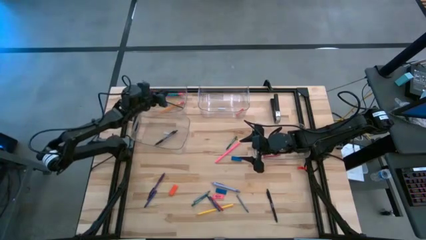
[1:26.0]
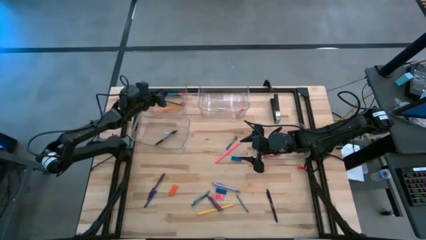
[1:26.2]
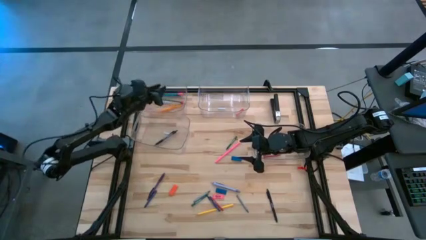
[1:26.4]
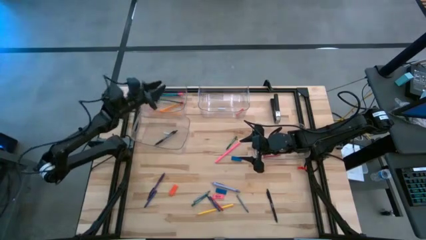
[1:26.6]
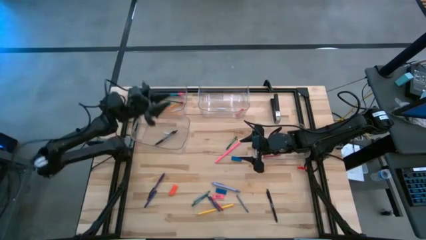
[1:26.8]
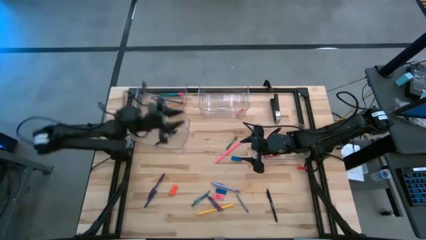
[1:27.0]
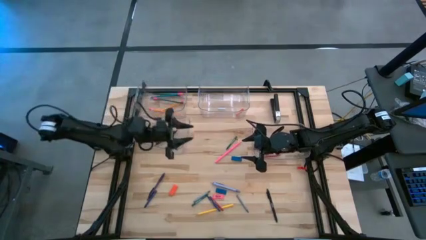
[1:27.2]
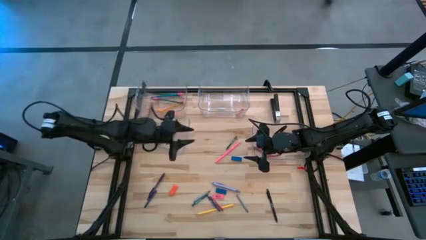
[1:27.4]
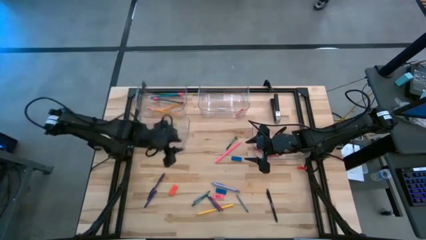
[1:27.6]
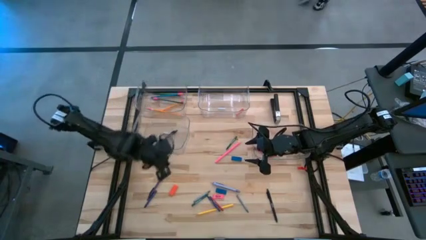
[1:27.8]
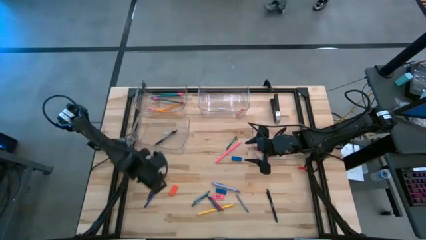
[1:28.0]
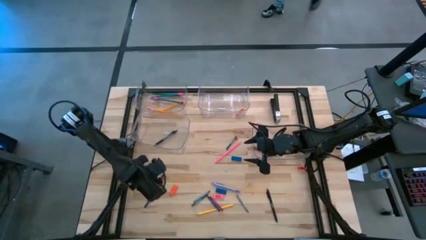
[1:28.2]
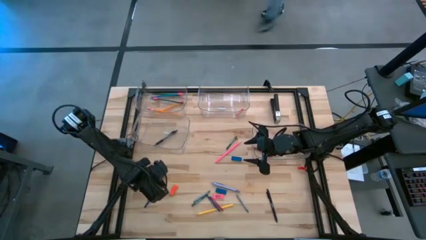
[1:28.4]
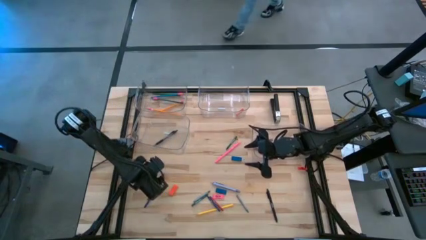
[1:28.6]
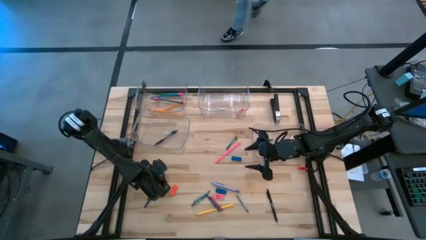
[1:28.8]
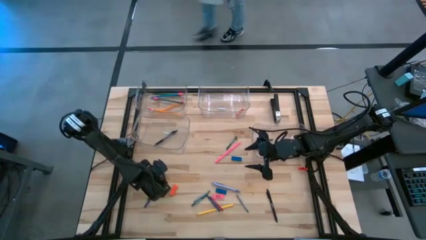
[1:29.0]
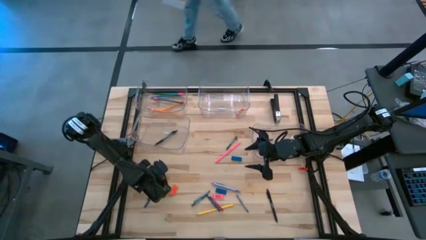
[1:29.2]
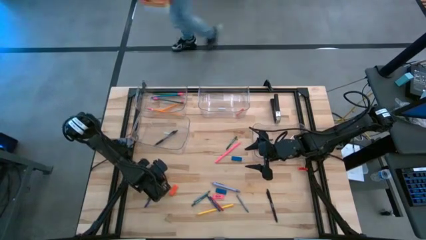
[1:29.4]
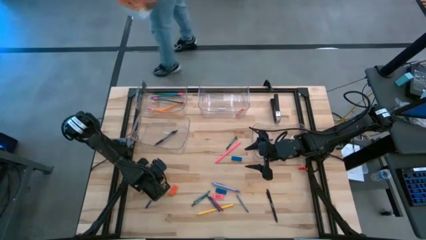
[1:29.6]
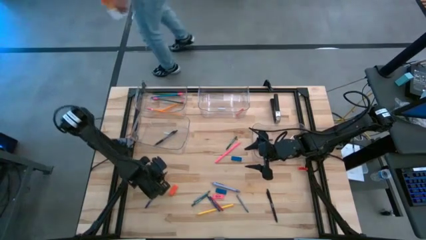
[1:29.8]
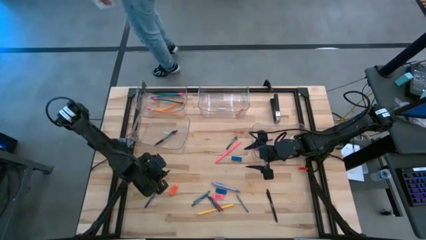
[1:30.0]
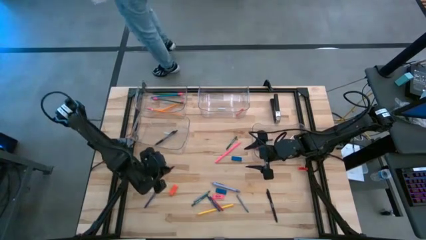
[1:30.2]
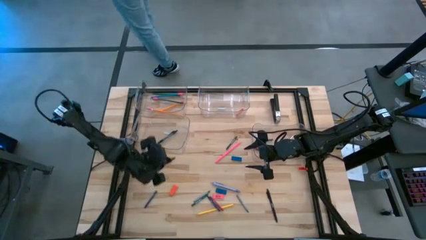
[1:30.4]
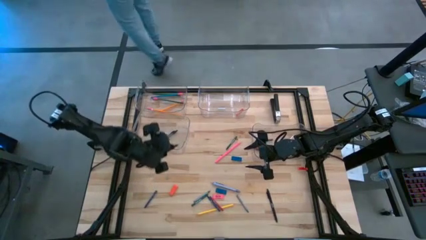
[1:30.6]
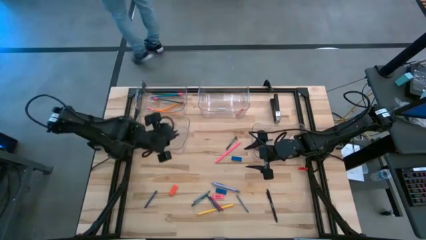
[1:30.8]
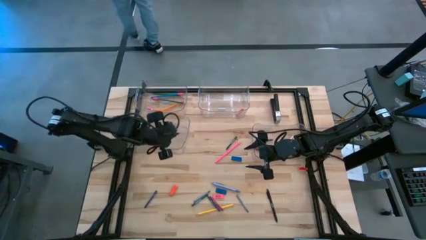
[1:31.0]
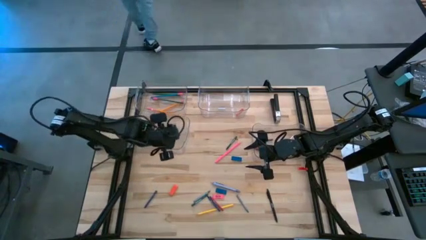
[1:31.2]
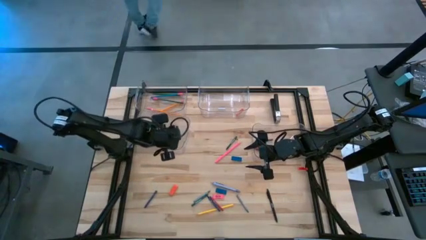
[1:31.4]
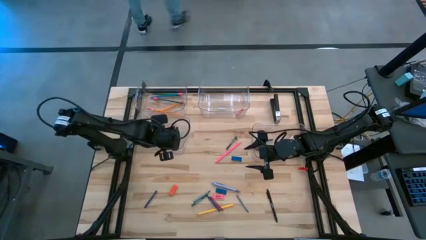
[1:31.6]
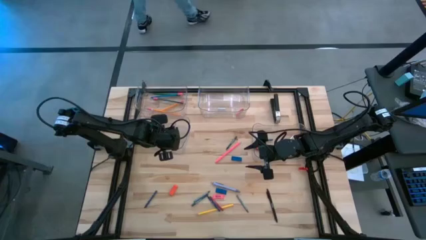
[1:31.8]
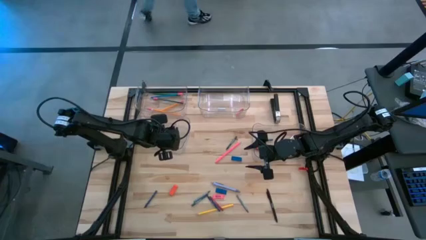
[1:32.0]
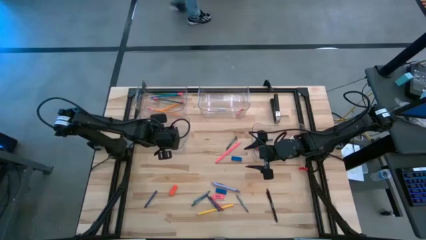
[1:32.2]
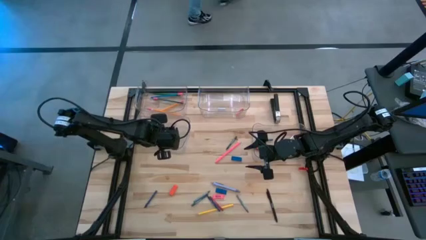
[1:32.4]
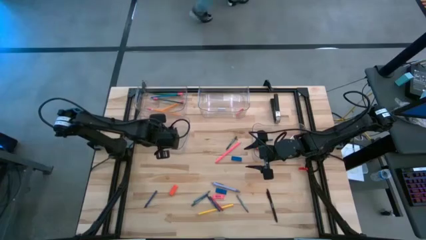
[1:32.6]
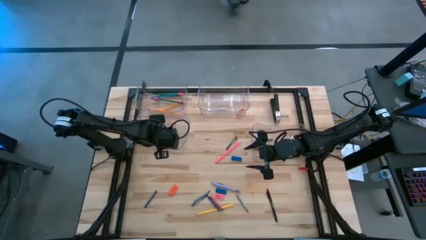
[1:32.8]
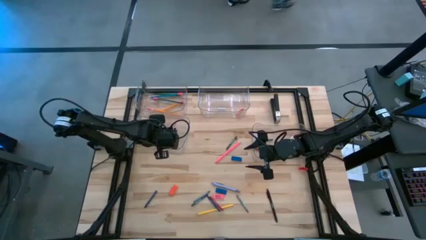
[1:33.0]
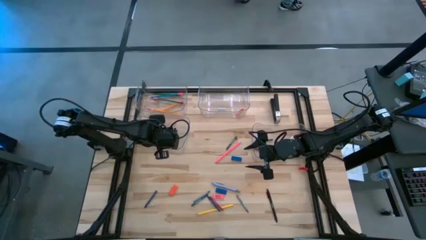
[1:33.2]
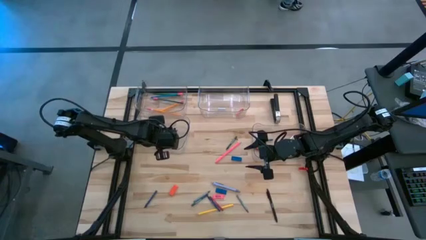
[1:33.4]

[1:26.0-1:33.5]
Task: Sort crayons/erasers/pens/pencils in bins
Put the blue pen into the bottom left transparent bin

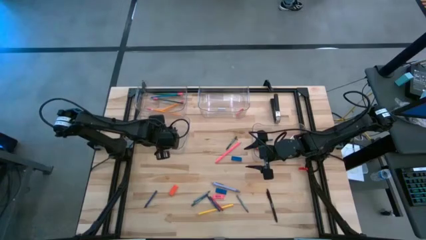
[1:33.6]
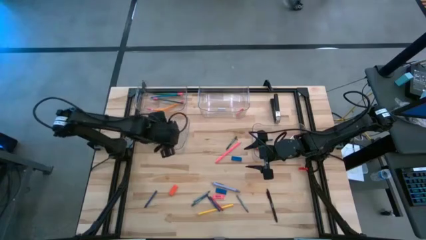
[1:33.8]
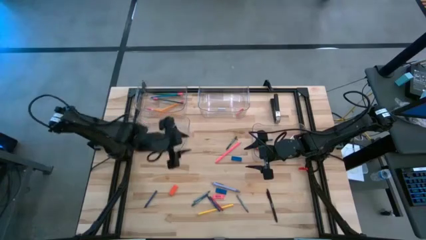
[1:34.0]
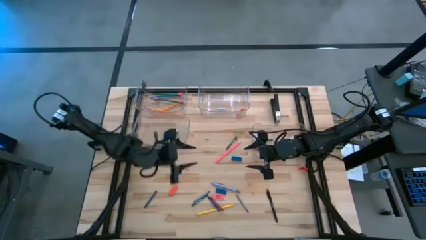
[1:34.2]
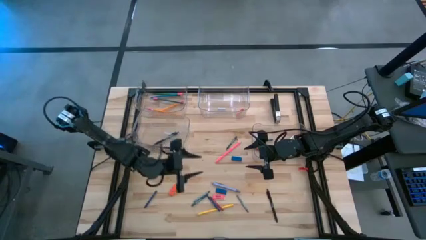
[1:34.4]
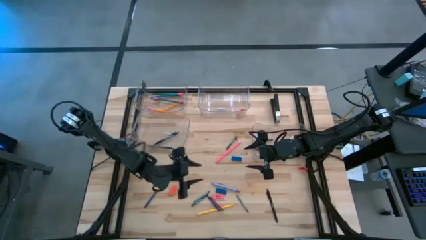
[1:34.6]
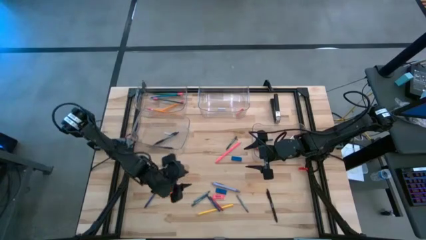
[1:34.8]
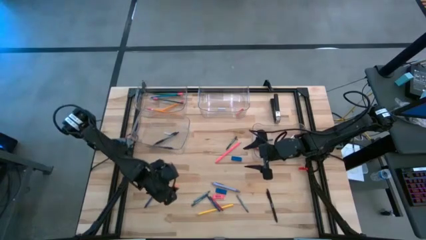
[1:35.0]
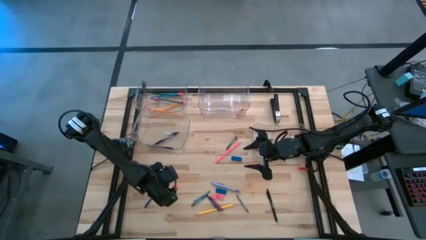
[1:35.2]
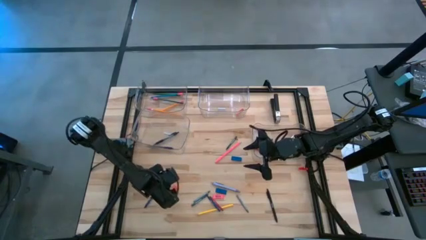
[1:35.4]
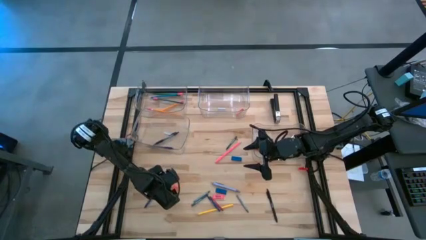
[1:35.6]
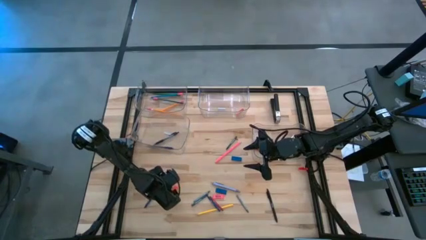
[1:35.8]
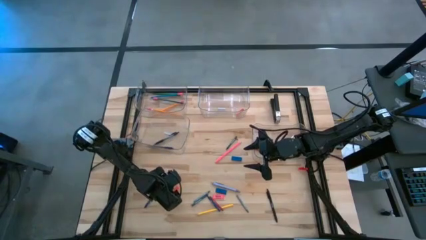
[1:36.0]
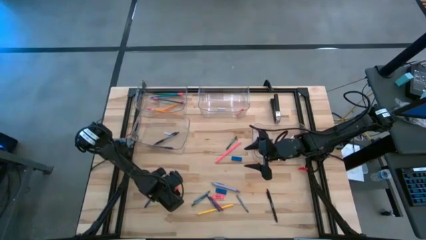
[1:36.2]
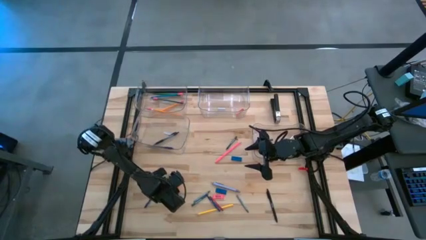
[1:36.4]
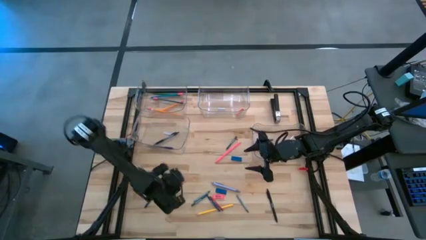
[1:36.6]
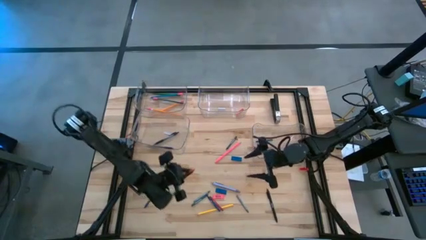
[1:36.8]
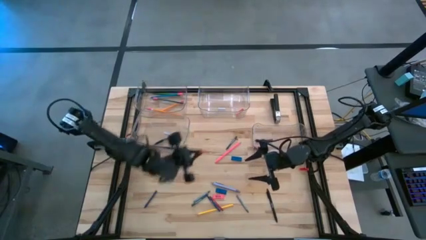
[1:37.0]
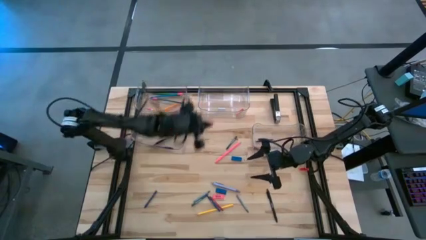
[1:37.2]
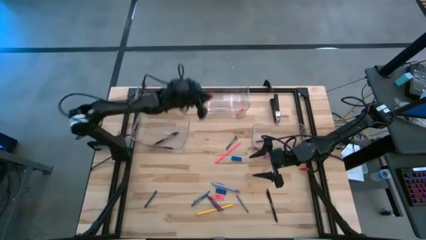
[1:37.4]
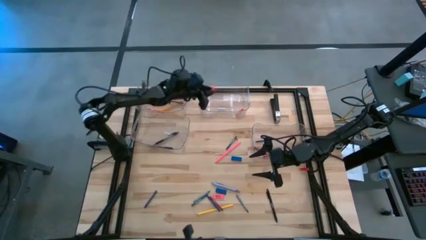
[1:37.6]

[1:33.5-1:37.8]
Put the orange eraser into the top right transparent bin

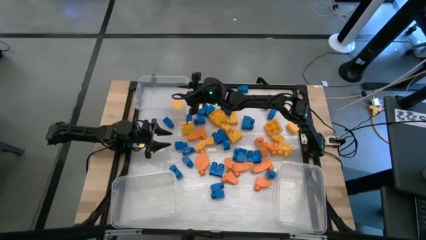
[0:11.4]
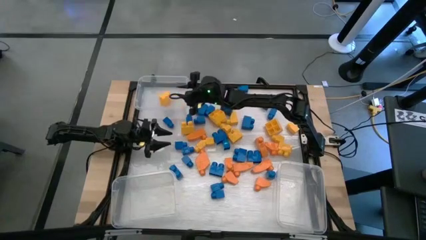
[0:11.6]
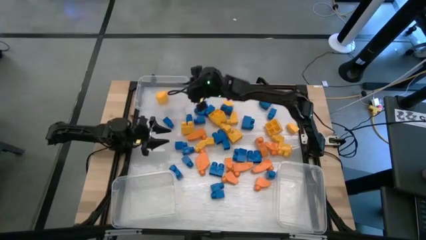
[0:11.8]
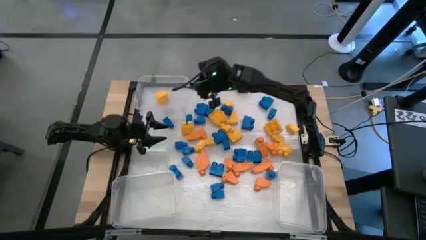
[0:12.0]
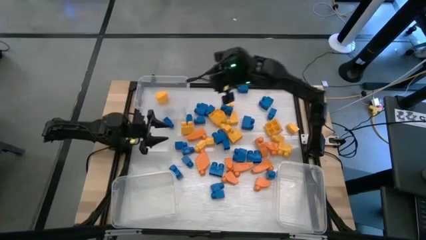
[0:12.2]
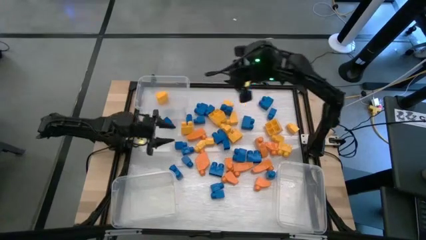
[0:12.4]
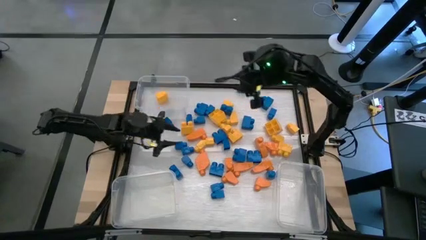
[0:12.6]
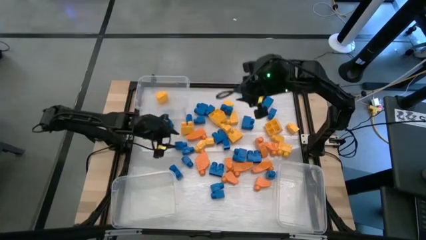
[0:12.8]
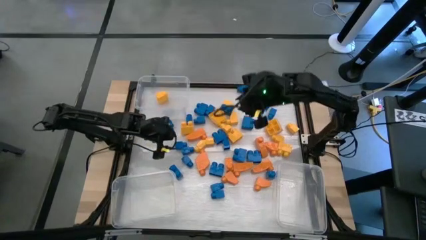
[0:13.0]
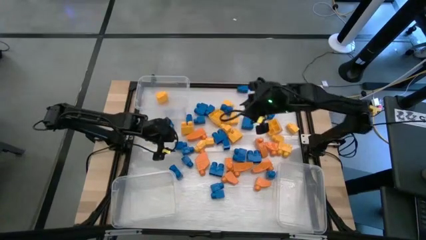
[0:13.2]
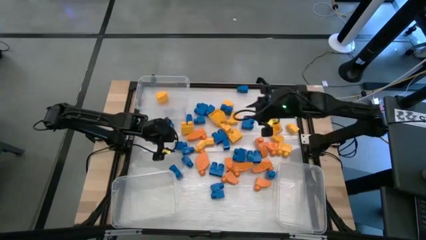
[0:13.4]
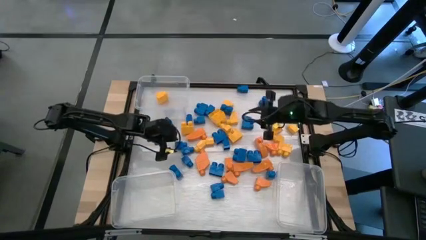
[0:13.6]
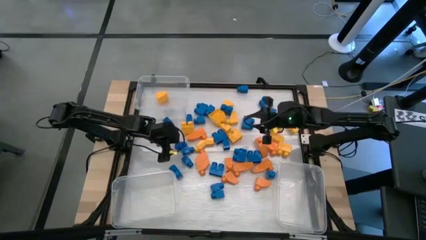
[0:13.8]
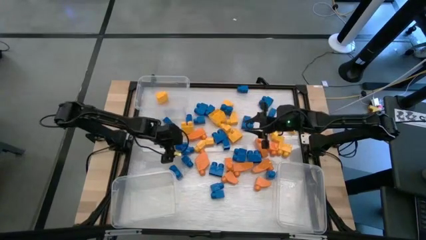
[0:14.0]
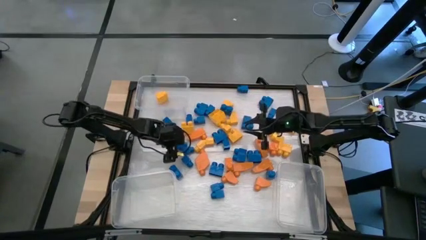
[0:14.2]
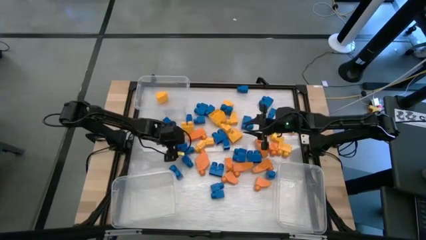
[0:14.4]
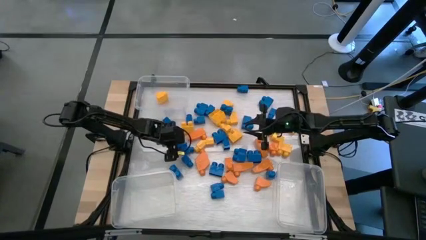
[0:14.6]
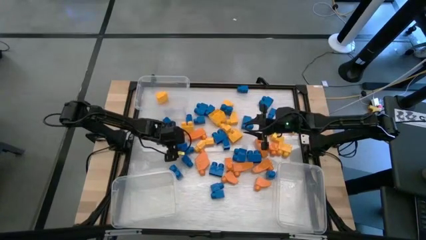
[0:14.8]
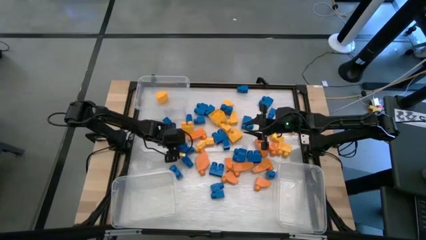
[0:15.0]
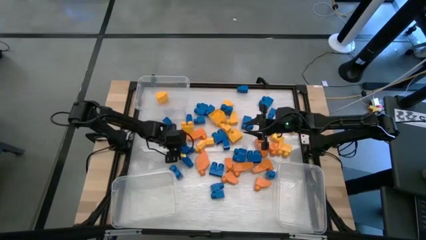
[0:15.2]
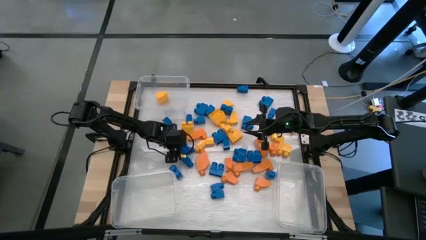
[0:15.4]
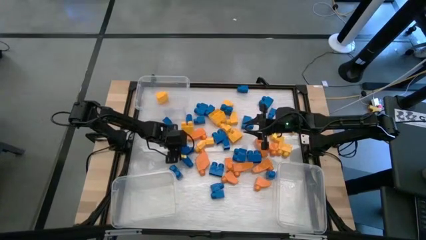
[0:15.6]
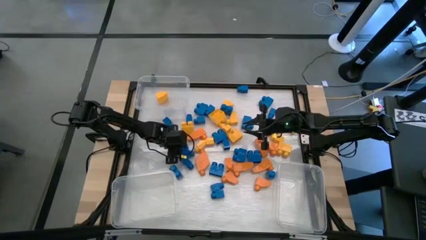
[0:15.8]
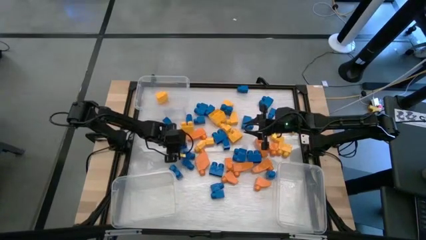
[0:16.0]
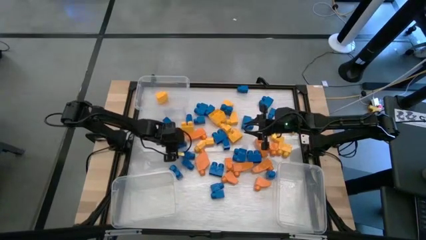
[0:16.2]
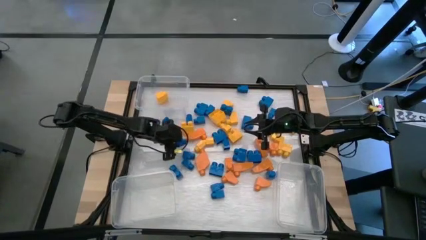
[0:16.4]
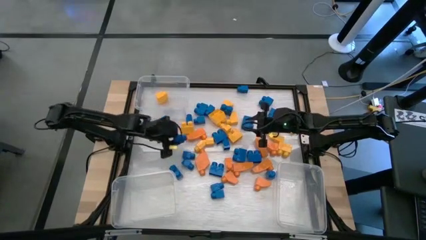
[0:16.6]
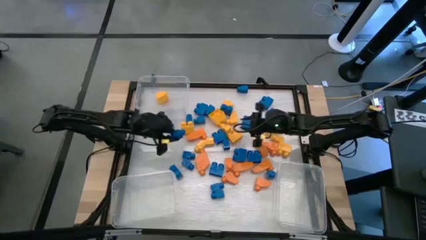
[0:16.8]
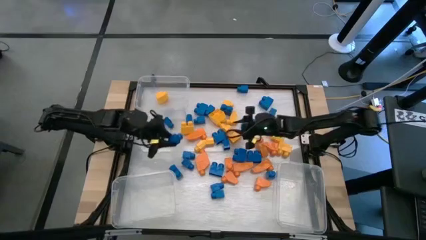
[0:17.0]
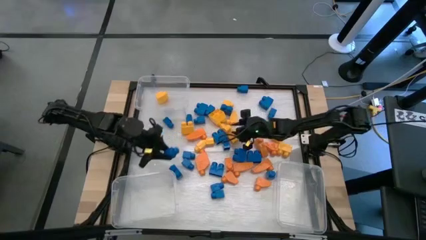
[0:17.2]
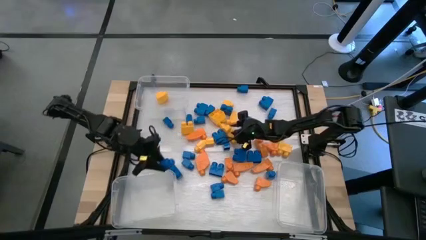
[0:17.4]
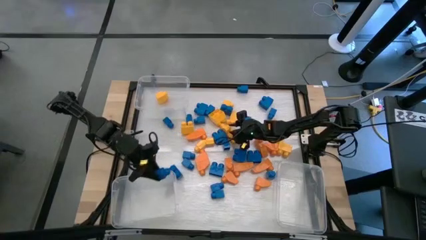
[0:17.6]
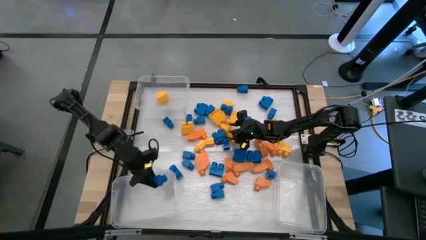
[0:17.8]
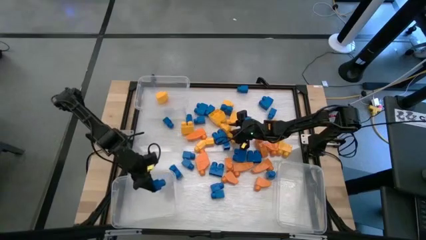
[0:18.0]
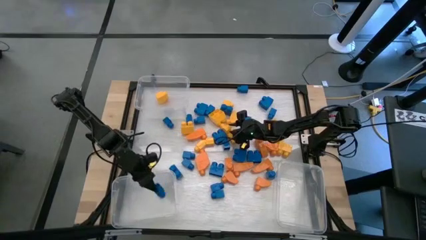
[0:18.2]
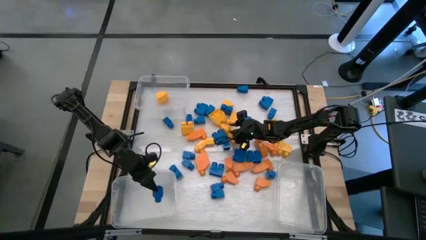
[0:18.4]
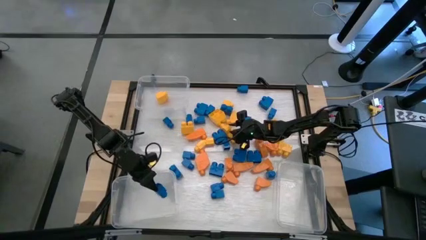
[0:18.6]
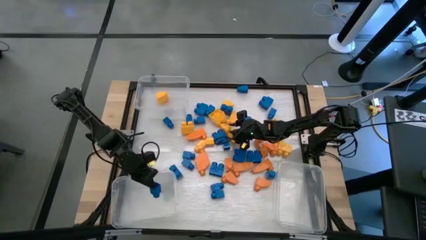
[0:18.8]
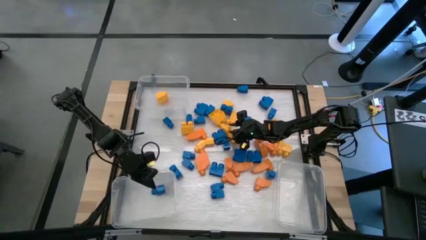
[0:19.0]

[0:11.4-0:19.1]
Task: Sort blocks
Put the blue game piece into the bottom left transparent bin
